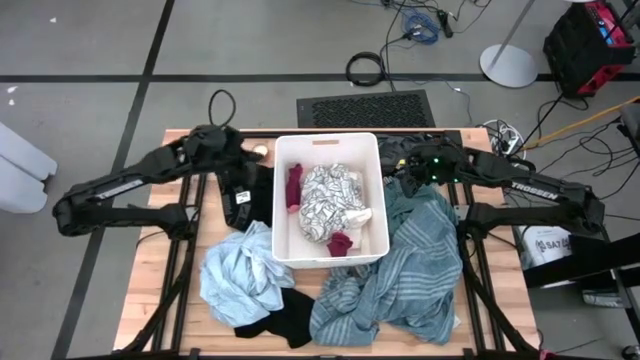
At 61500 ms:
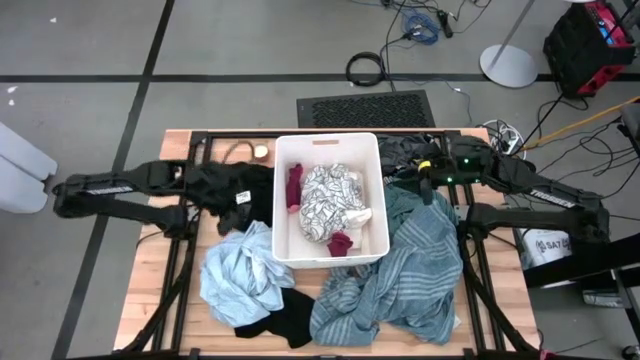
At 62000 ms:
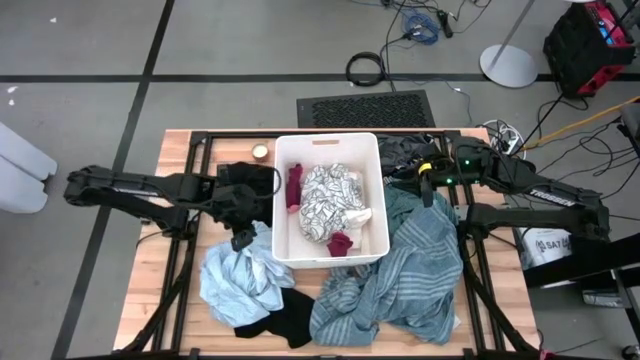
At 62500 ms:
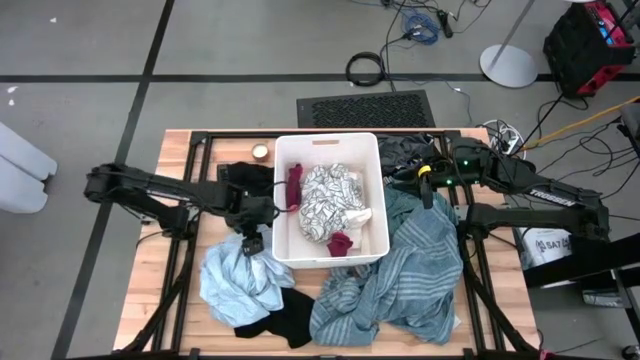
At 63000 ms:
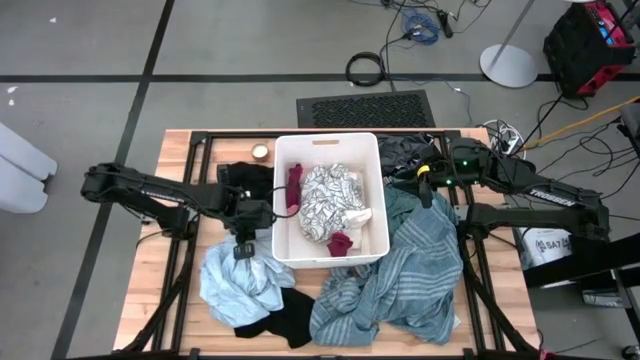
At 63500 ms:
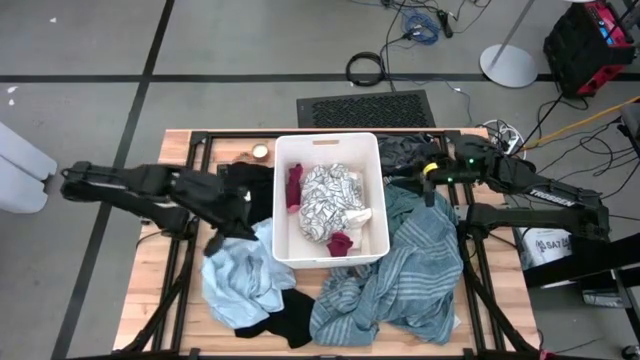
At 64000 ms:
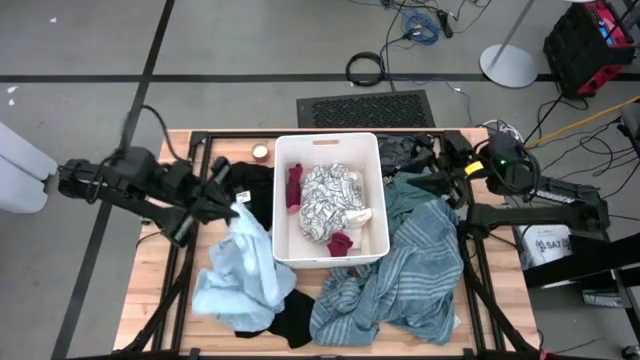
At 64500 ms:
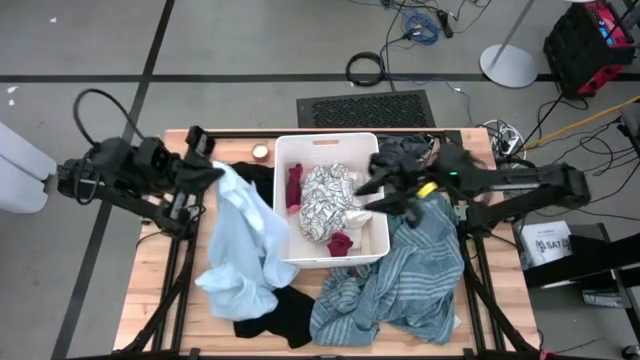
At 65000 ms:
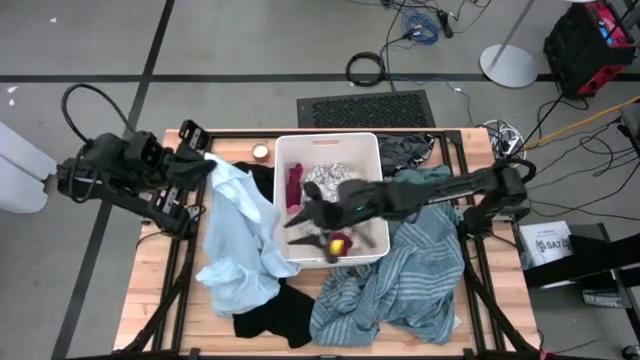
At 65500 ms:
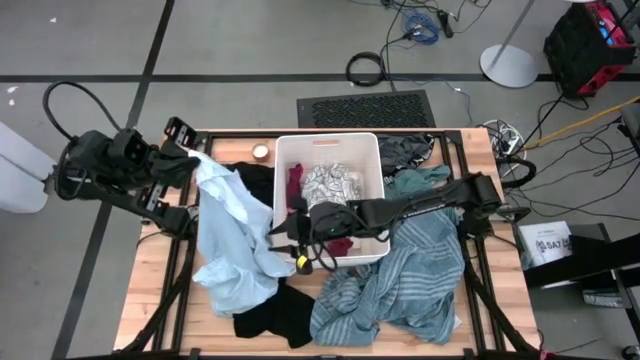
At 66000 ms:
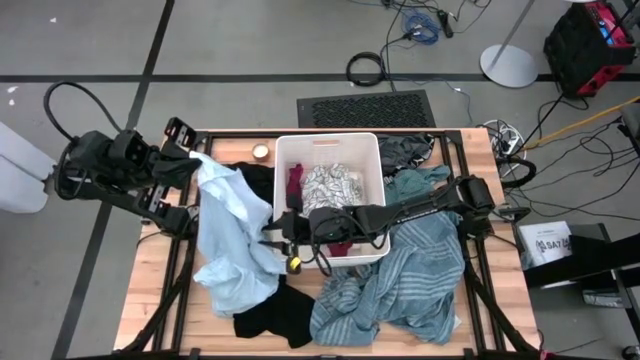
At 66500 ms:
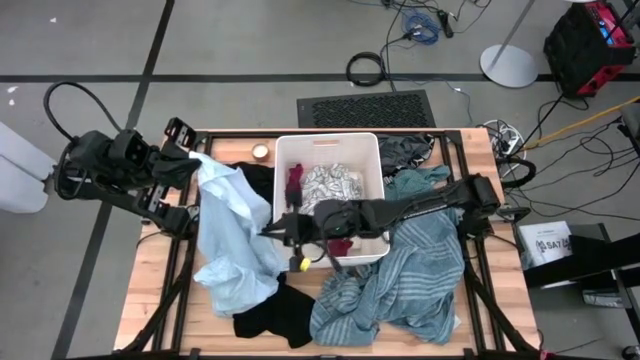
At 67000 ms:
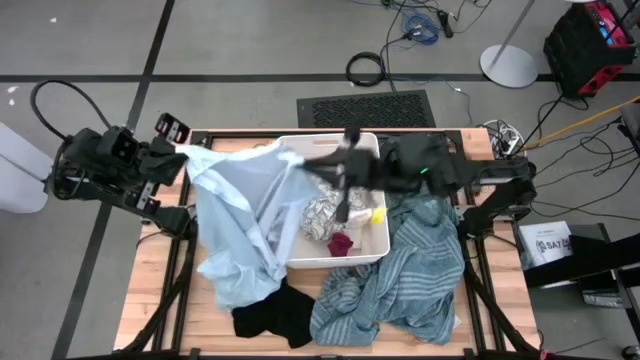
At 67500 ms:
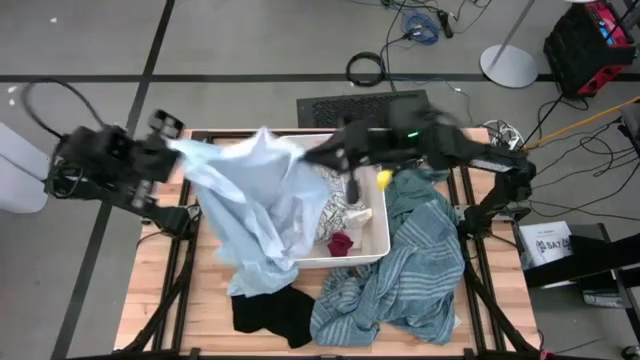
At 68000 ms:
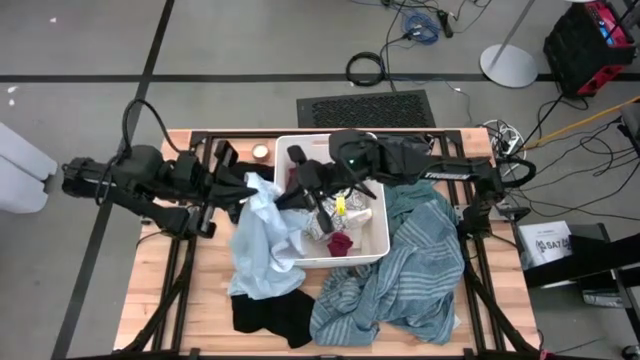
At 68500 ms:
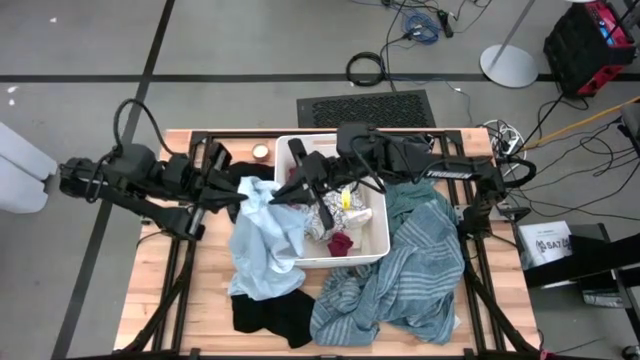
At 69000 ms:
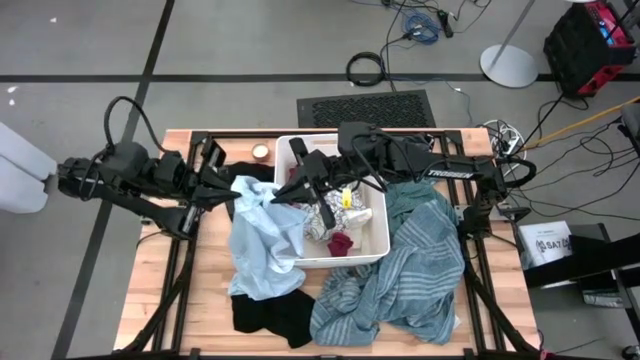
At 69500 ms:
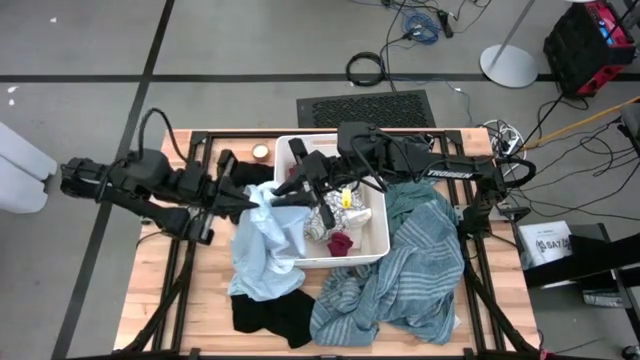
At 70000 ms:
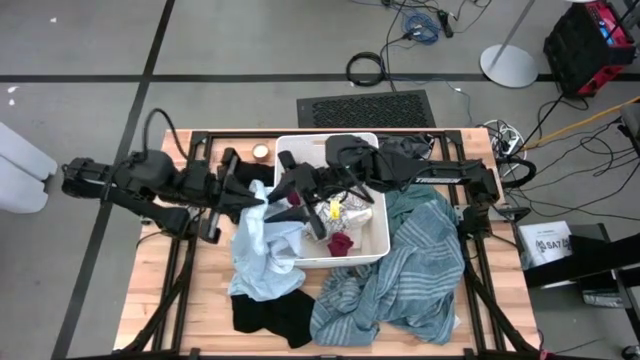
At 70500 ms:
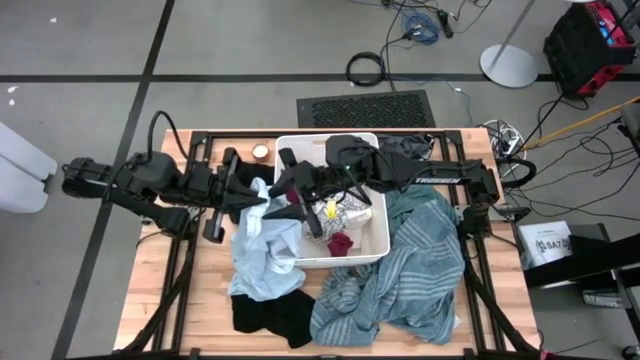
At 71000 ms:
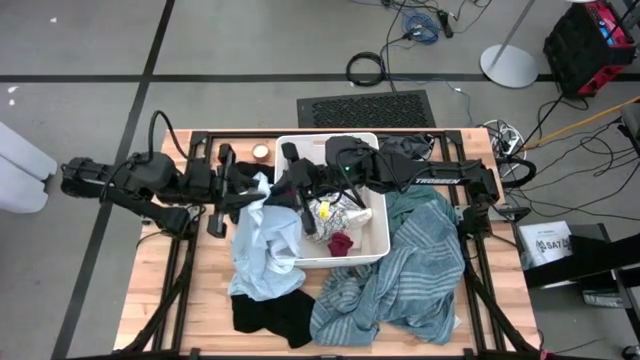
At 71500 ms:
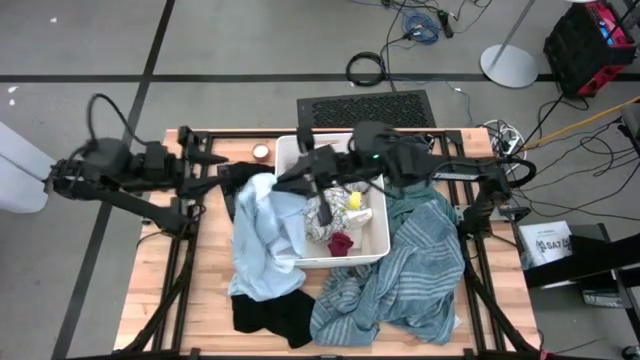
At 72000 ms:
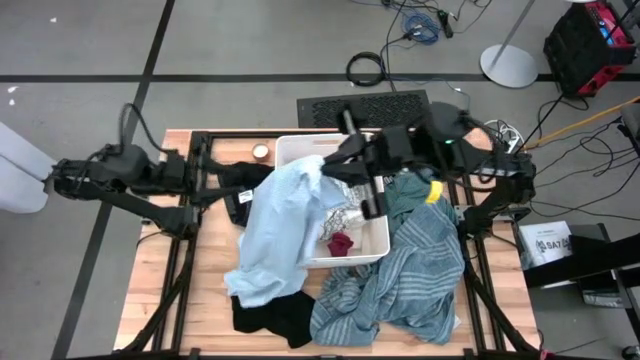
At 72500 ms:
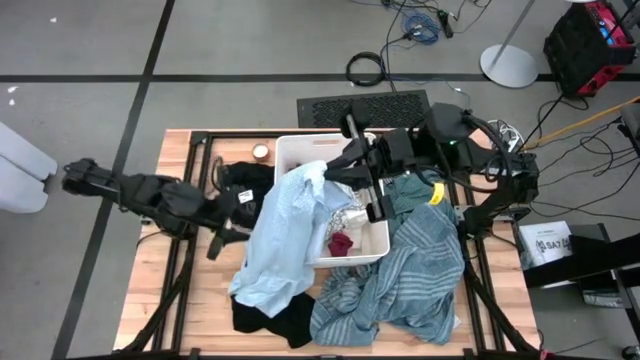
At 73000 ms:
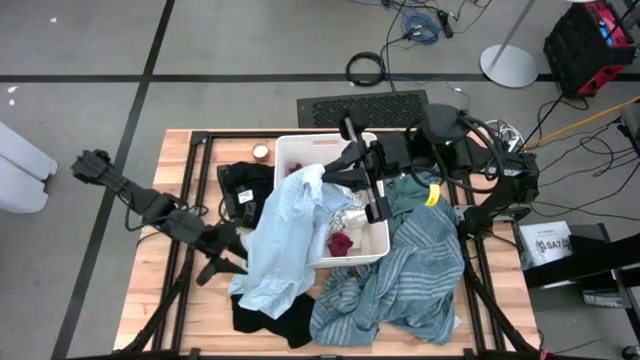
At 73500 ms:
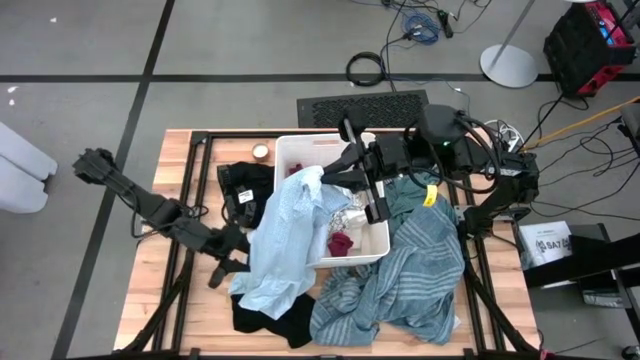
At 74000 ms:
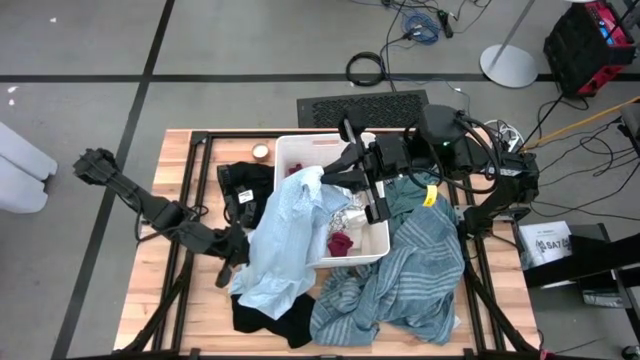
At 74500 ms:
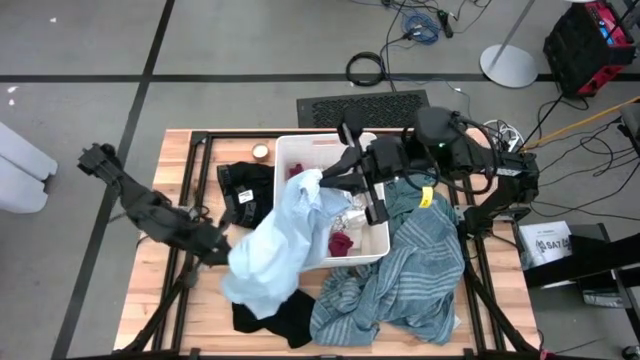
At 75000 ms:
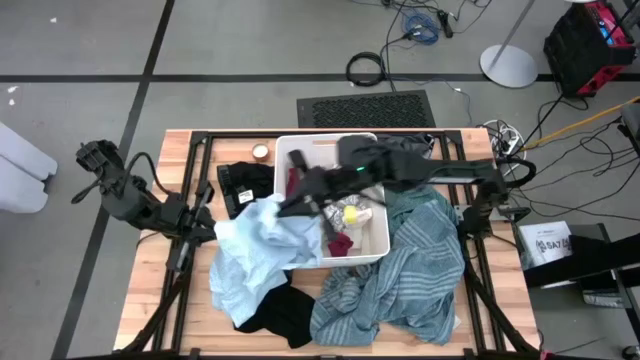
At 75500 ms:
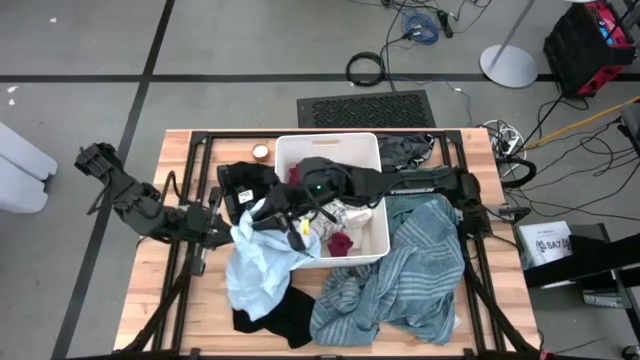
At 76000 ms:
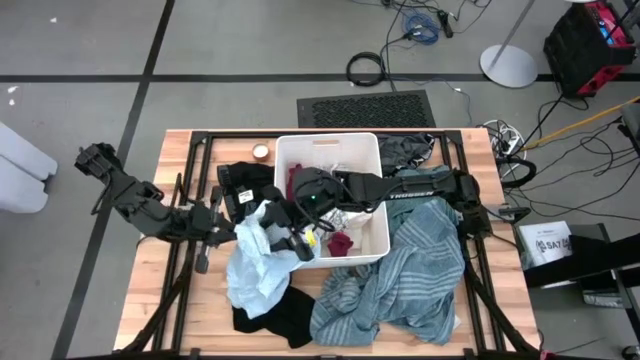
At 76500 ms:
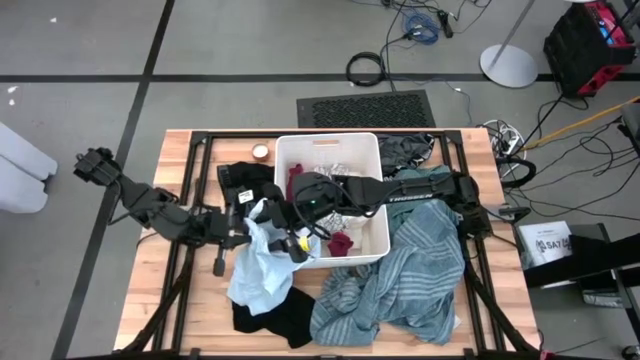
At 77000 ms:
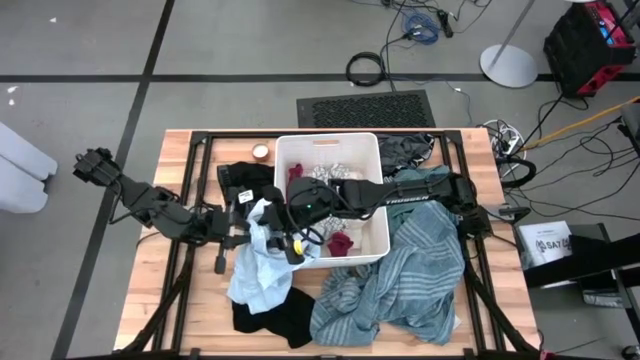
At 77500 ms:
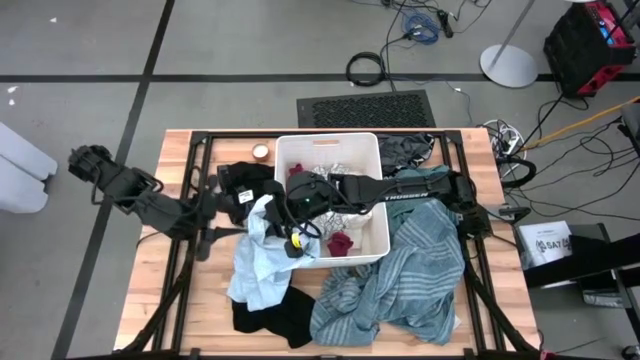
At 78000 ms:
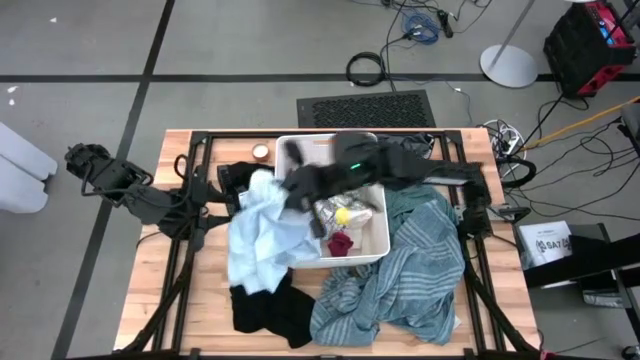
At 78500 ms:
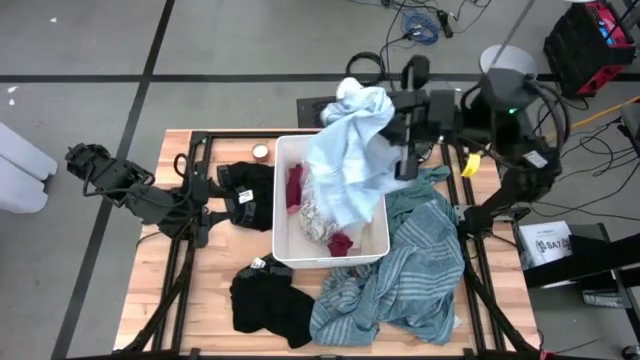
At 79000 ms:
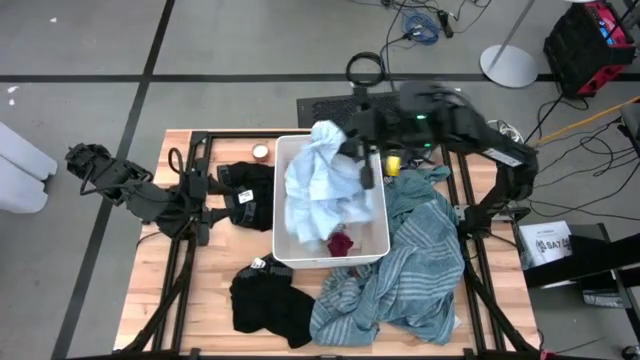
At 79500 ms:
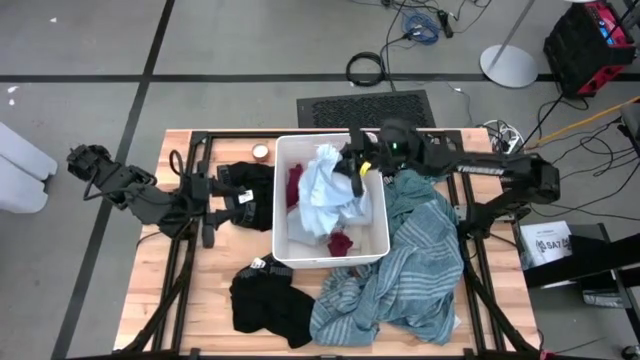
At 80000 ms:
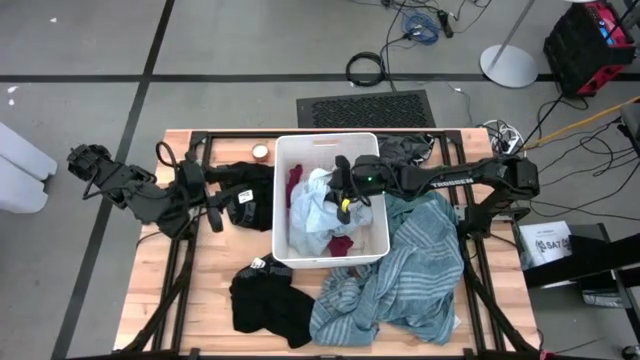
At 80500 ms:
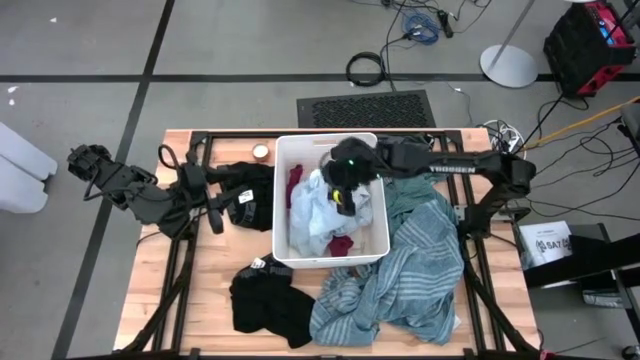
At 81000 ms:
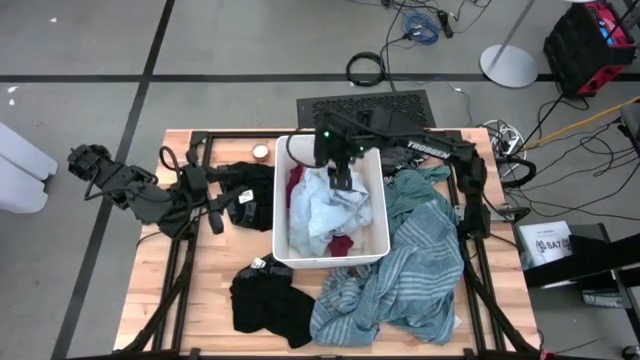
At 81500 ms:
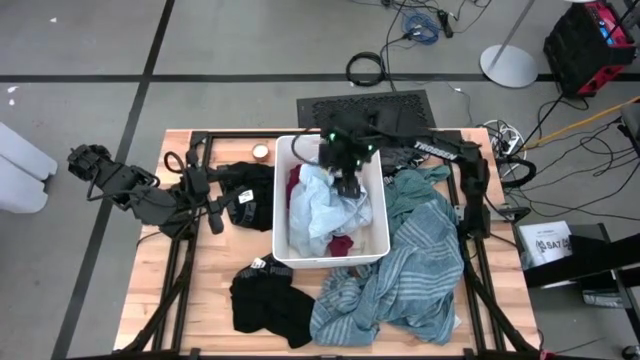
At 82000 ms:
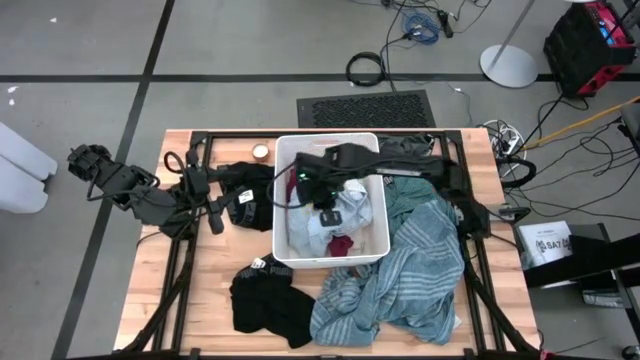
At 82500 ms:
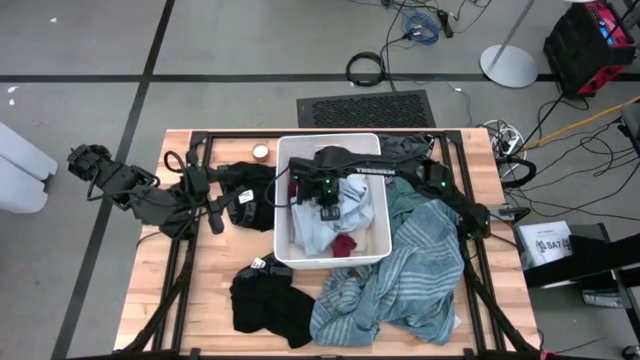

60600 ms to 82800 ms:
Task: Sort clothes
Put the light blue shirt into the laundry bin
